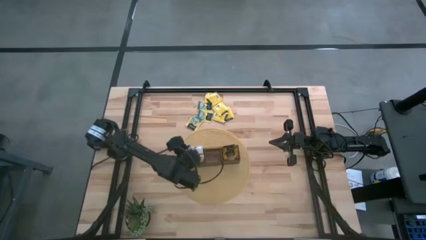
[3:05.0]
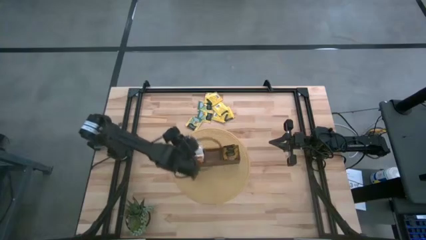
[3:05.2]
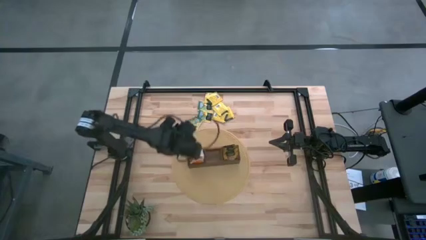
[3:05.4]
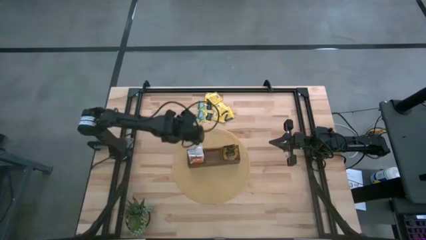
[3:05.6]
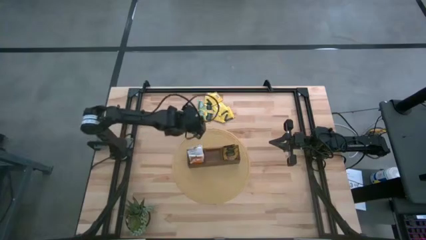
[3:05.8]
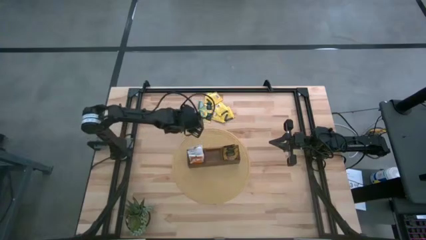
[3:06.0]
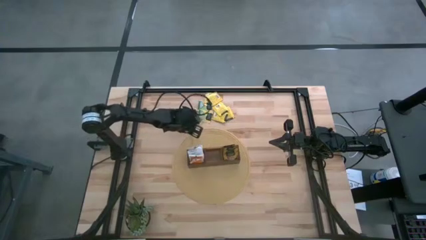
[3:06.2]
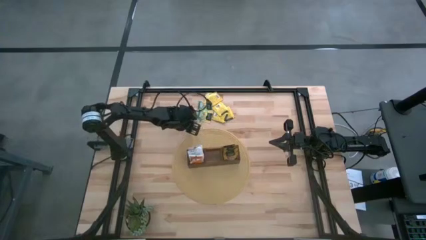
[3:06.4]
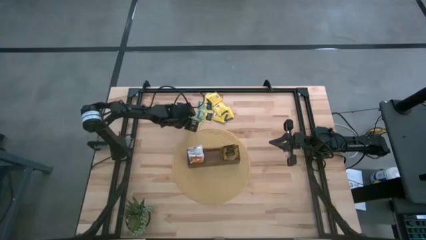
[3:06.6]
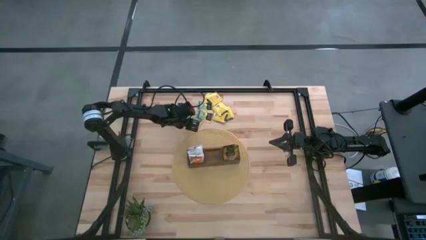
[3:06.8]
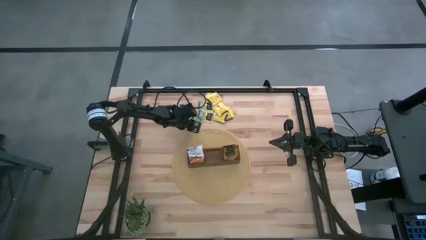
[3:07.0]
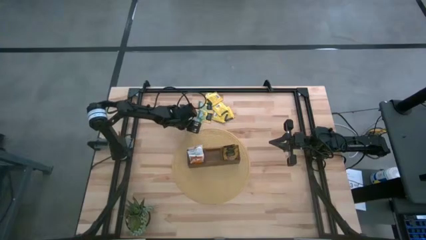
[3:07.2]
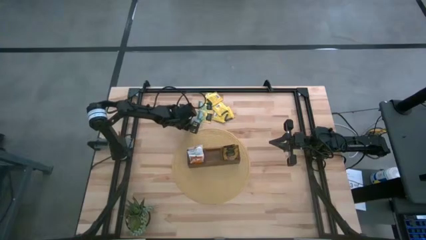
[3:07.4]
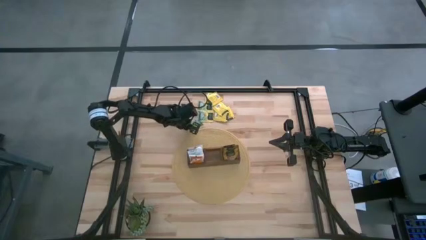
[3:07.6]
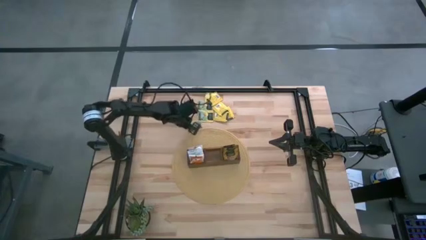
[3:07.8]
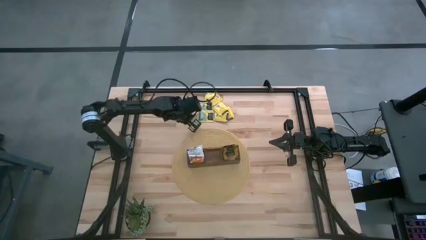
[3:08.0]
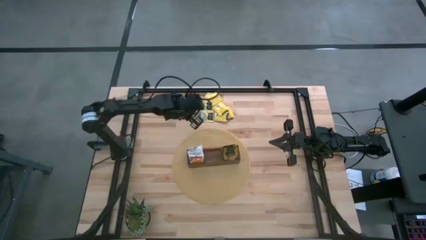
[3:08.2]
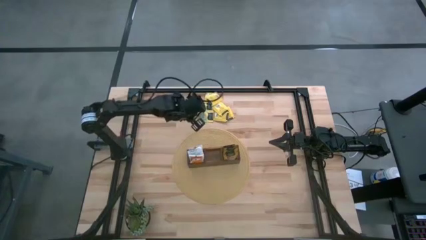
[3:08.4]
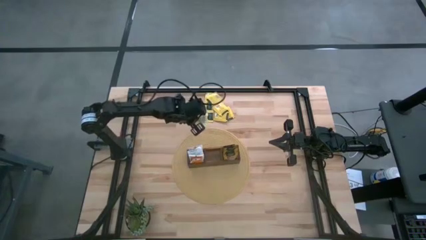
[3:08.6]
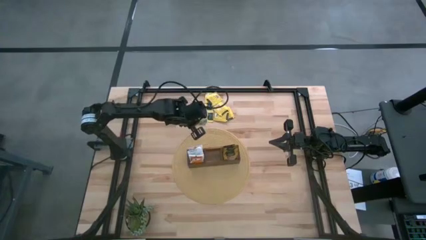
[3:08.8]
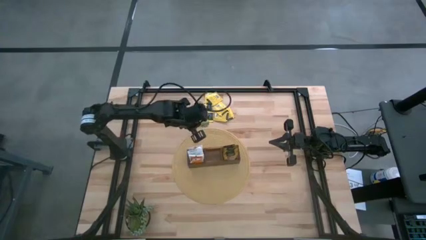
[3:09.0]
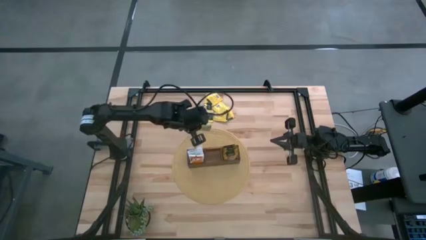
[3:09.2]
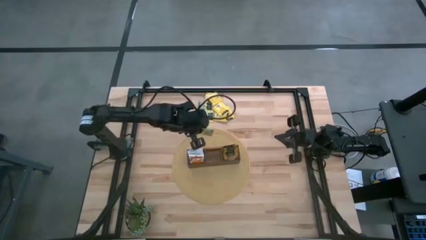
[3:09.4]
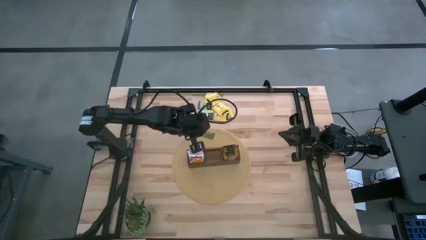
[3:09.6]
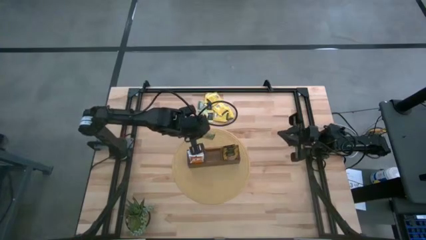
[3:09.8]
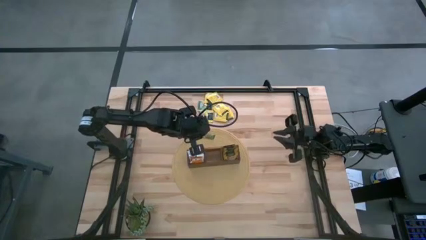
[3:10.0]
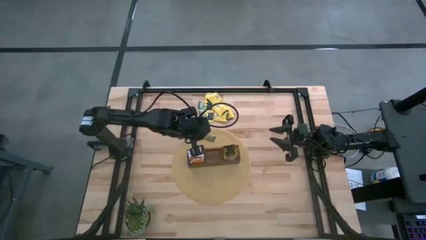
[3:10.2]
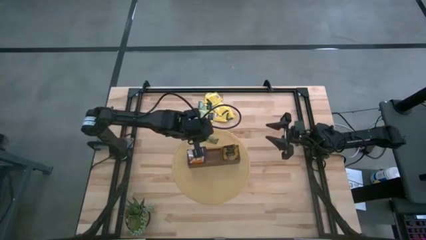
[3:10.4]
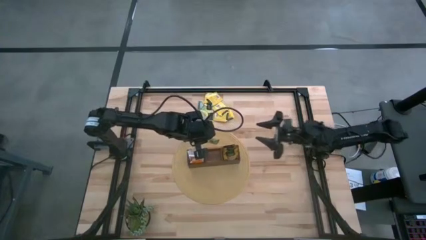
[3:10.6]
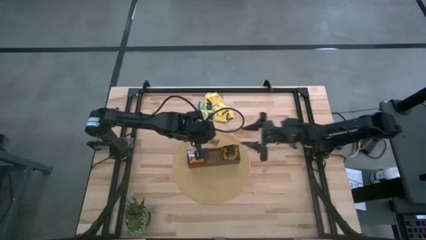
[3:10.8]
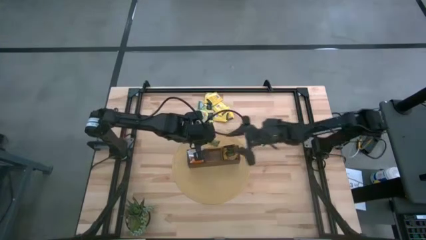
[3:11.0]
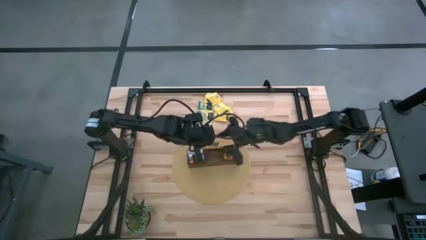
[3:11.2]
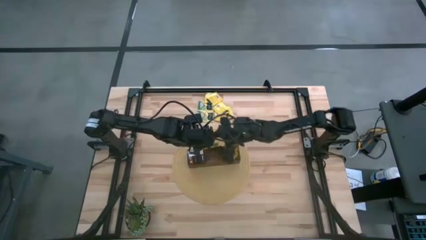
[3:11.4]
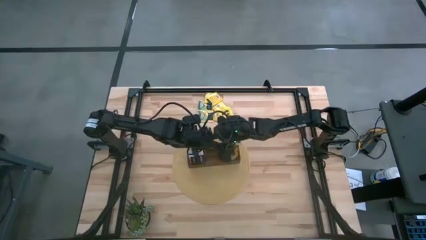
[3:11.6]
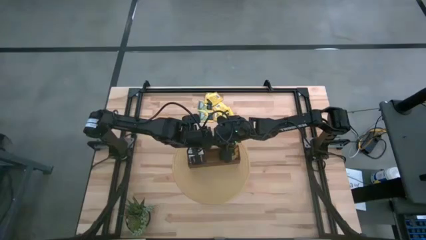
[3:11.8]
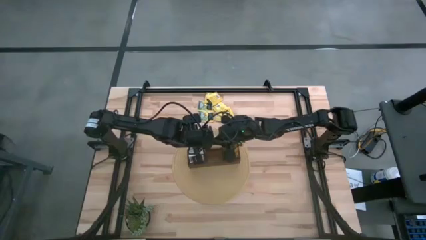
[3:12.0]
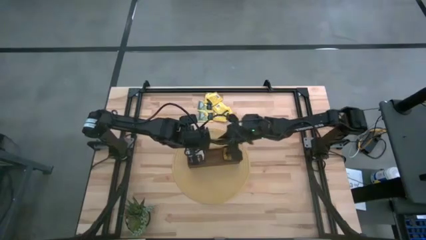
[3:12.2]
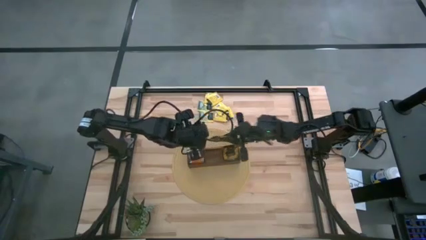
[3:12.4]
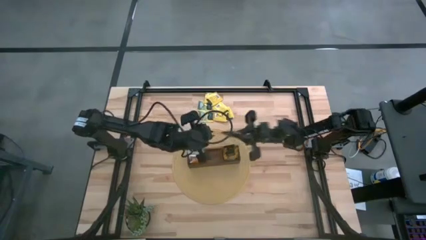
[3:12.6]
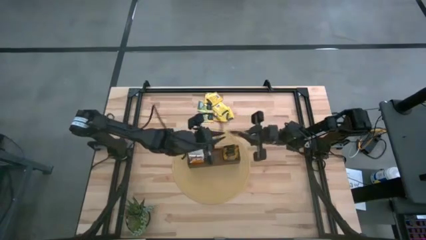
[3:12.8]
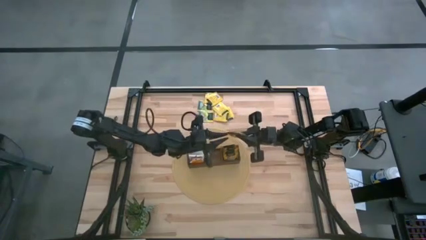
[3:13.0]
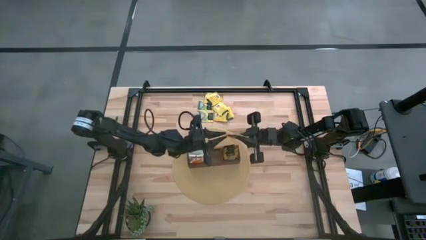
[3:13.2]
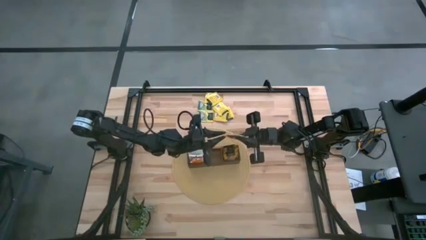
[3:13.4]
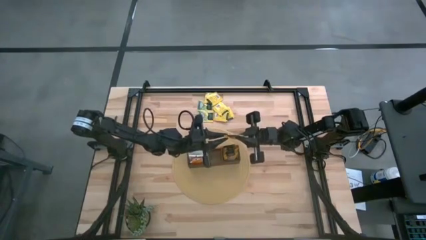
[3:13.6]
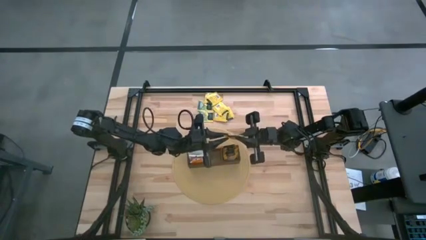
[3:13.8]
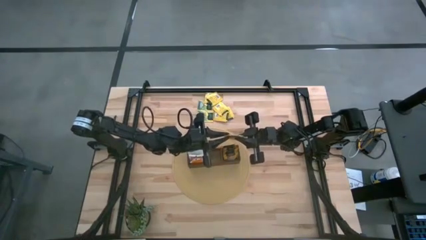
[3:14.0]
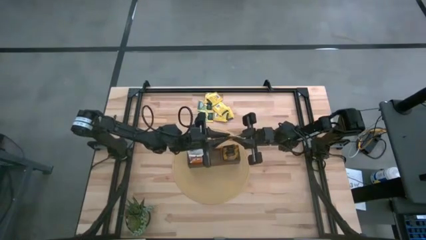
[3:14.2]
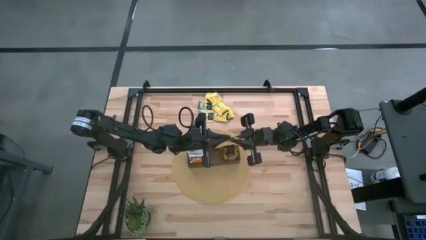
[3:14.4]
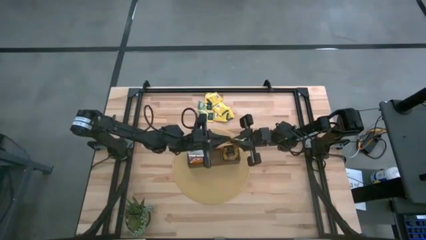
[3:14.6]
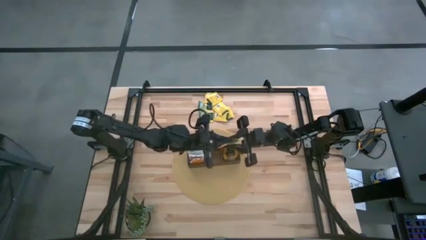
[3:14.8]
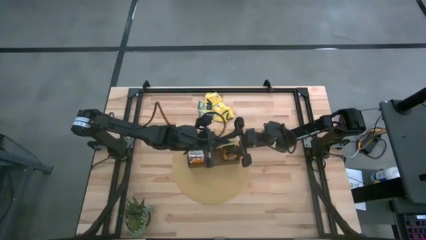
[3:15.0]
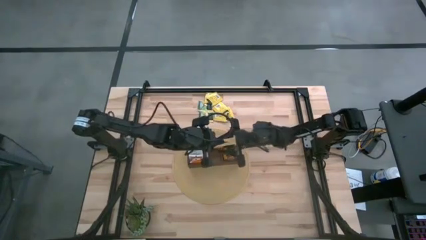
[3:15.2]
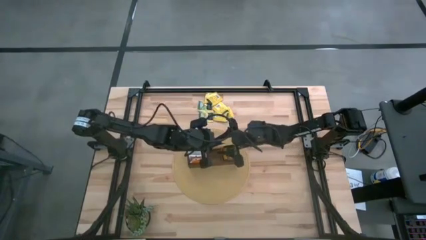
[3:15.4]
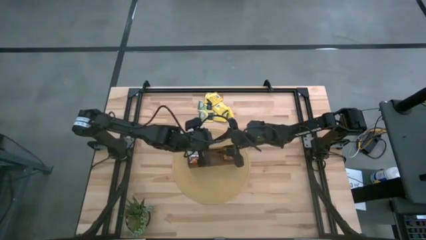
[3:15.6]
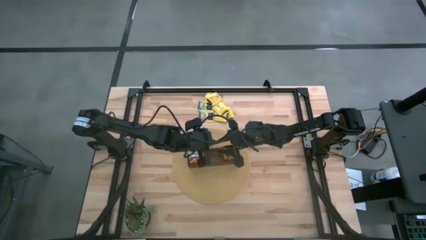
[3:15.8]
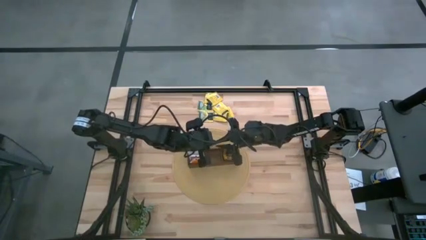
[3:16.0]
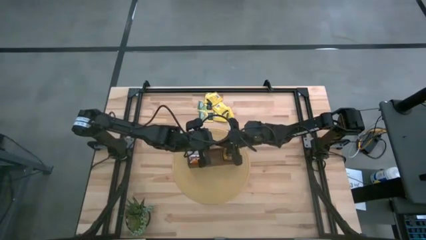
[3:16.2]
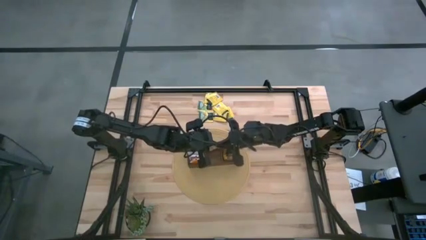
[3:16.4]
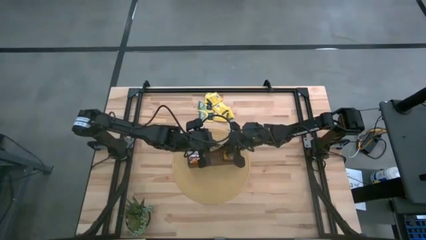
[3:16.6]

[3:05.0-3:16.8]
Task: Pick & Place Tea
Put the white and orange tea bag into the wooden organizer

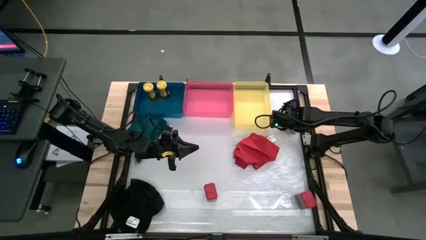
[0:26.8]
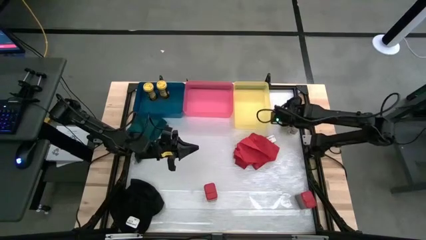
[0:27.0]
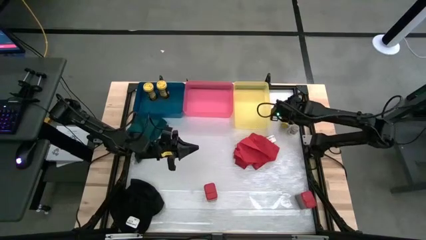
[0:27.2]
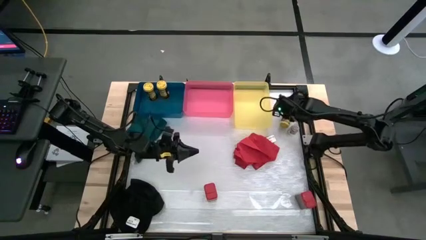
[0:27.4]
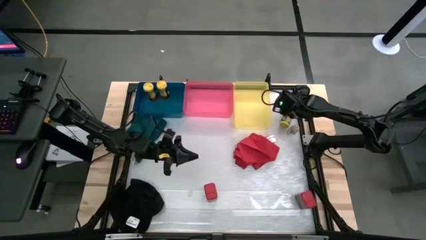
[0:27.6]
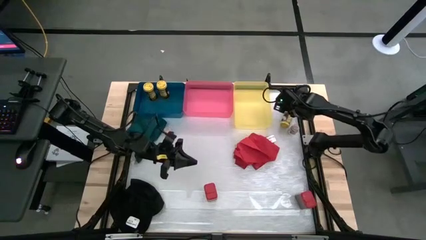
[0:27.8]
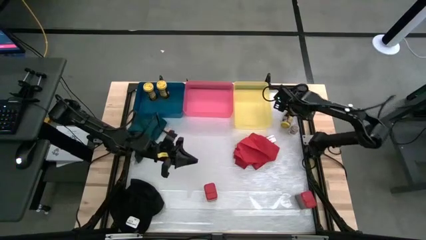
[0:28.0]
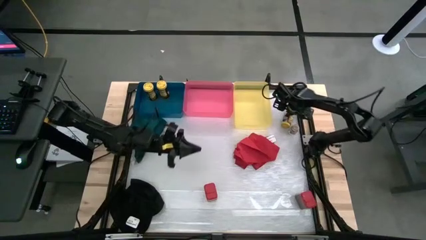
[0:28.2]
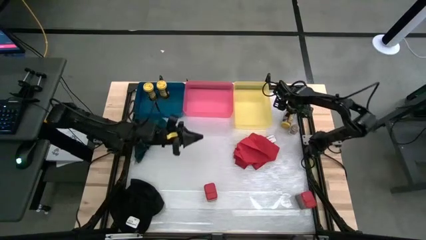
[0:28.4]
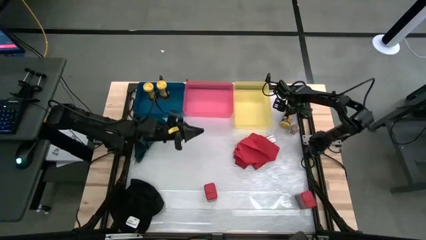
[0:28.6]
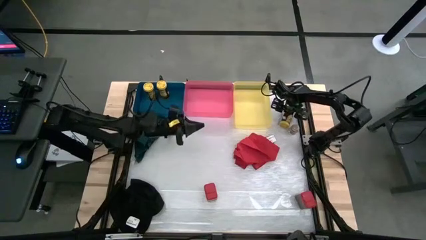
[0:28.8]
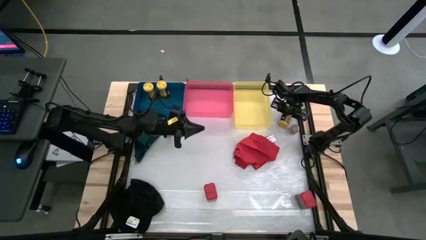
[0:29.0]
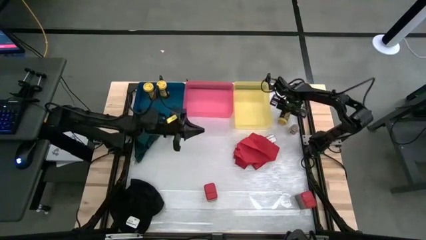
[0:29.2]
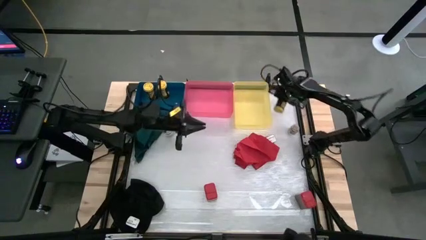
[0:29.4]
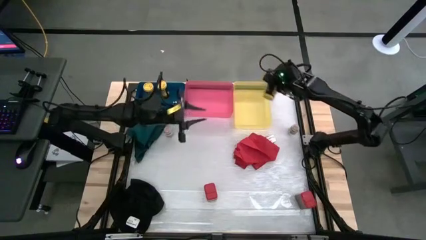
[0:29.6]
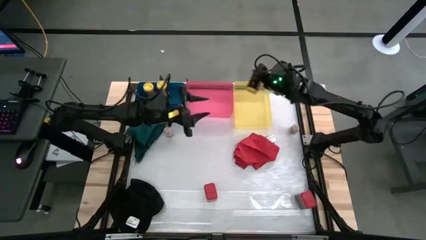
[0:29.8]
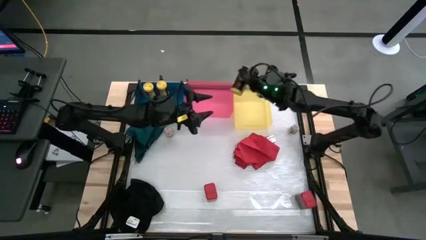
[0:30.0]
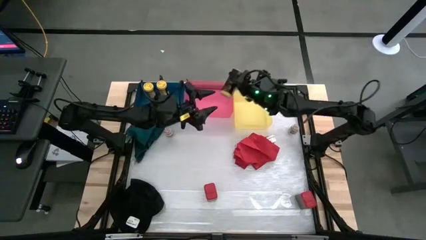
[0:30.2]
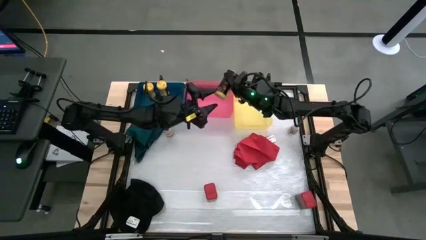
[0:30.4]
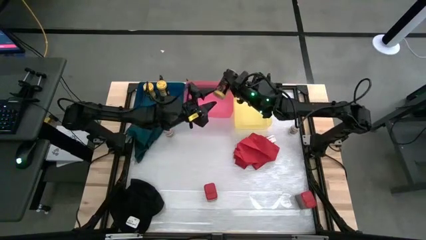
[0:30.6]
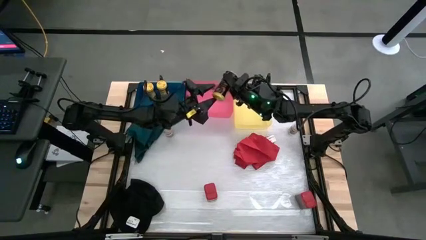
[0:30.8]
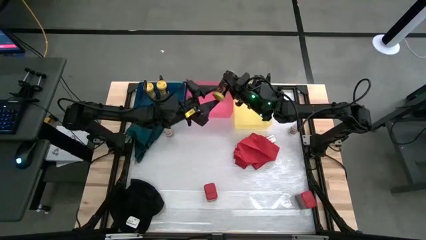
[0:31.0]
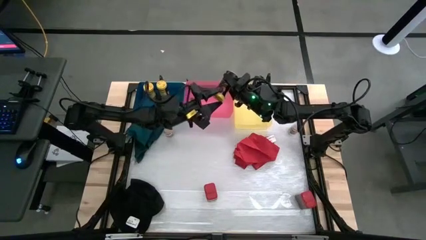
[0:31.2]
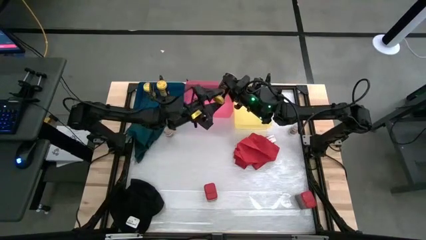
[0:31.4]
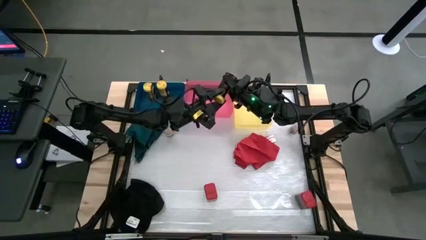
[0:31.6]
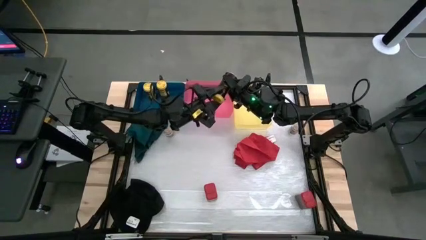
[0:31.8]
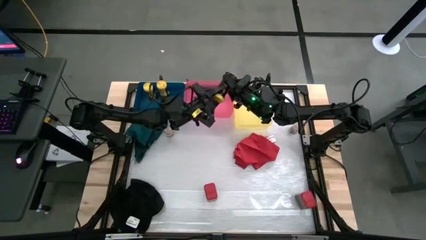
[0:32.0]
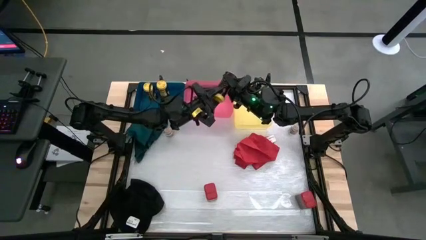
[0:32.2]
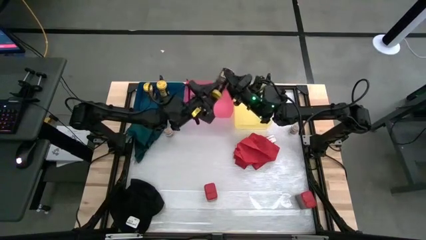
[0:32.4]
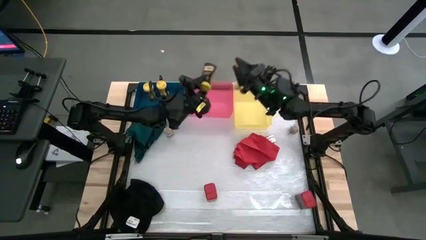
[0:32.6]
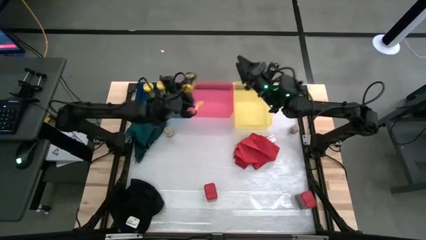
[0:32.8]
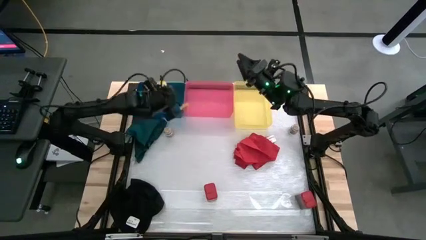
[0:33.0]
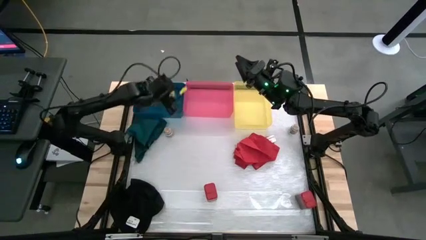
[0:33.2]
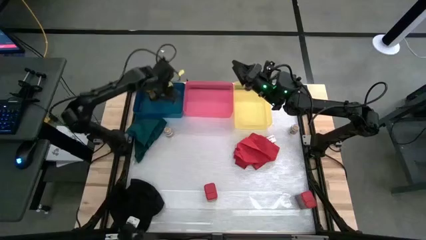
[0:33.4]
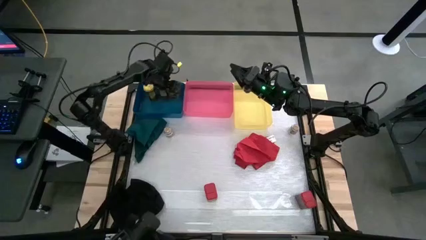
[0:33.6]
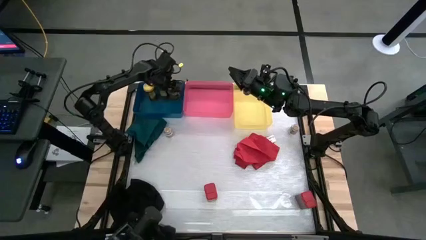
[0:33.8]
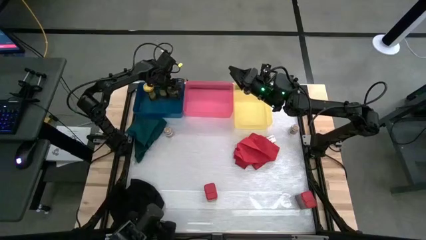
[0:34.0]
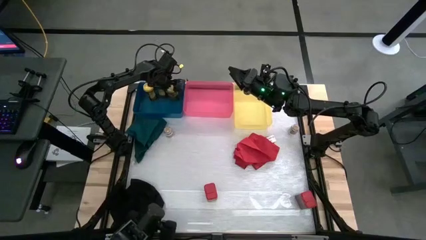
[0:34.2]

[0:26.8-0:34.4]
Task: Sort spices by type
Put the yellow seasoning bottle into the blue bin
